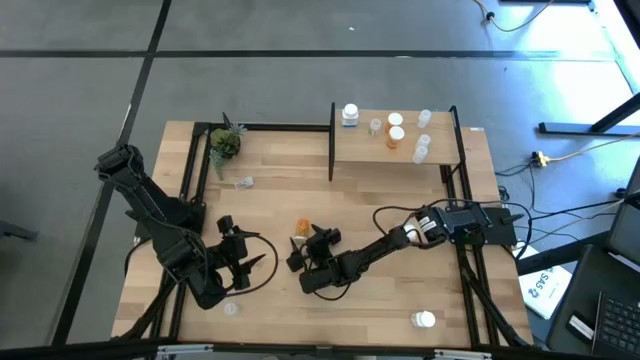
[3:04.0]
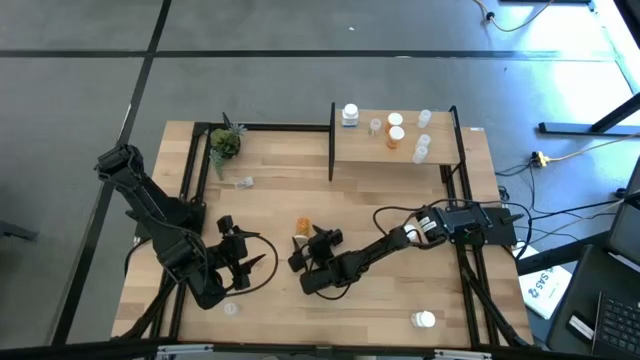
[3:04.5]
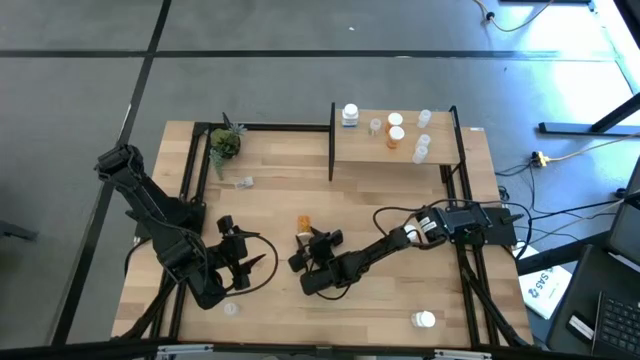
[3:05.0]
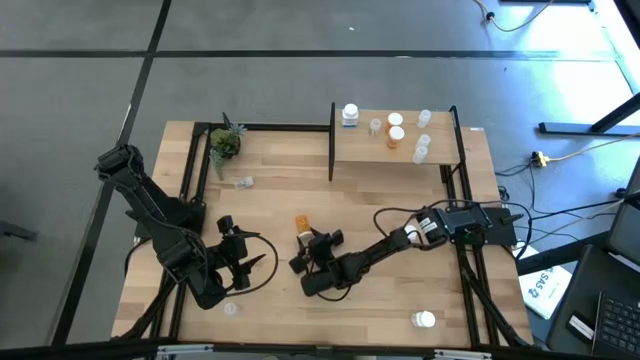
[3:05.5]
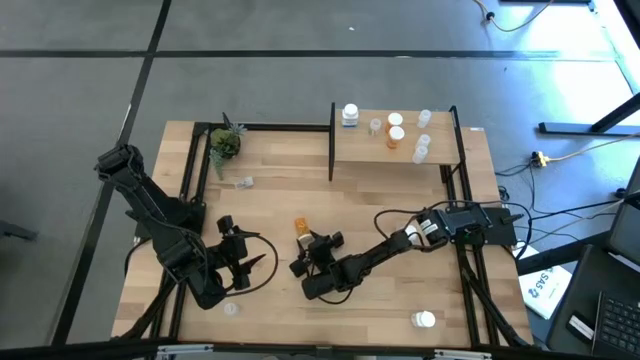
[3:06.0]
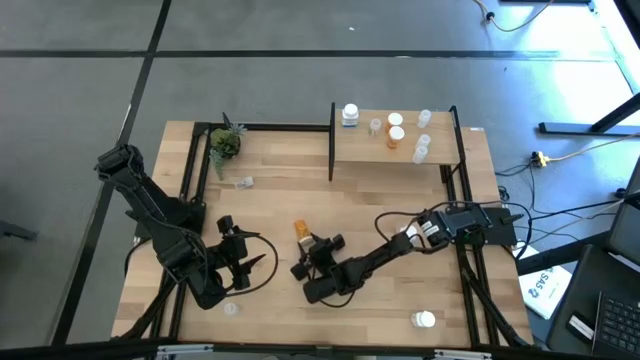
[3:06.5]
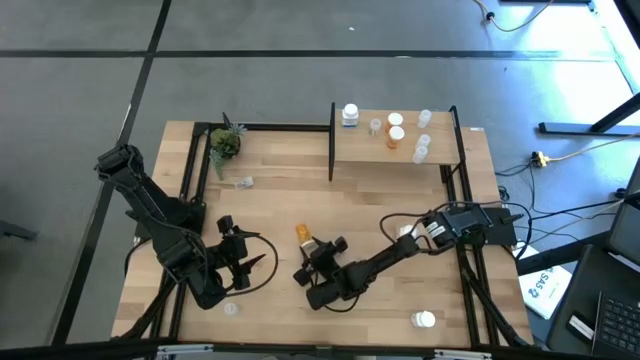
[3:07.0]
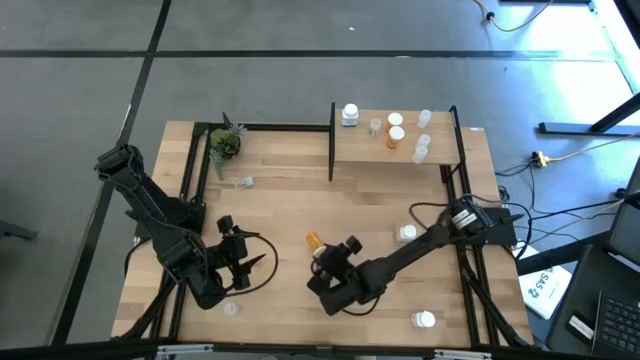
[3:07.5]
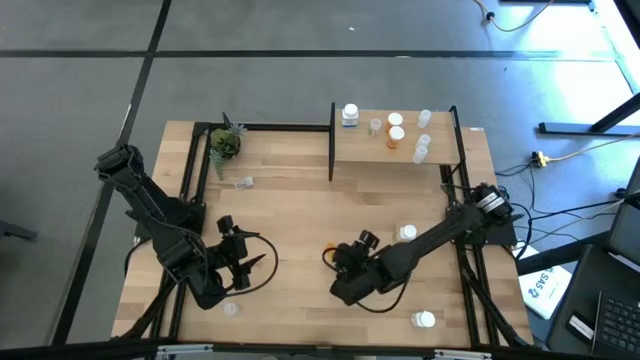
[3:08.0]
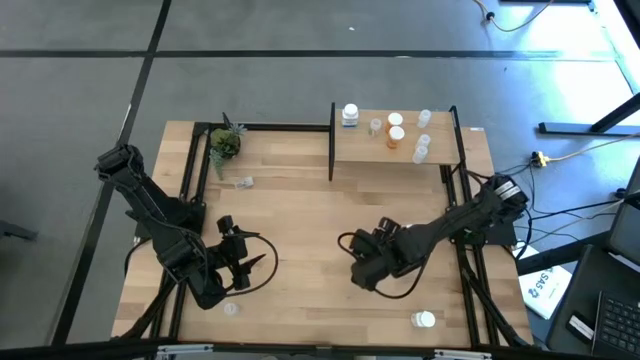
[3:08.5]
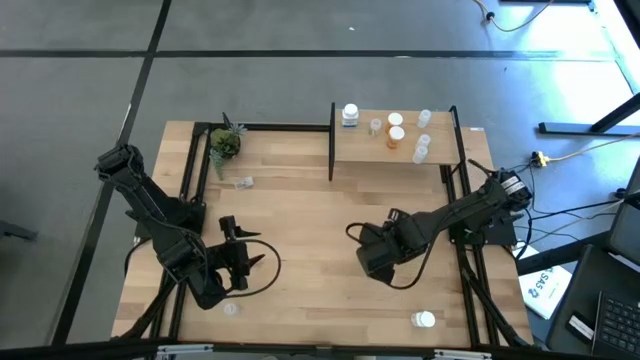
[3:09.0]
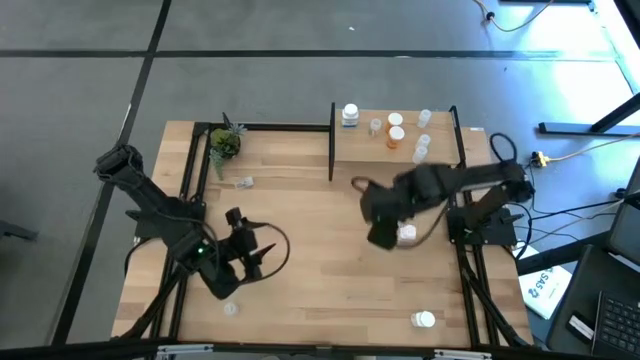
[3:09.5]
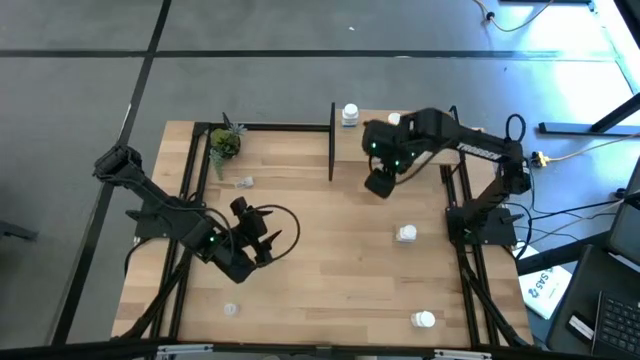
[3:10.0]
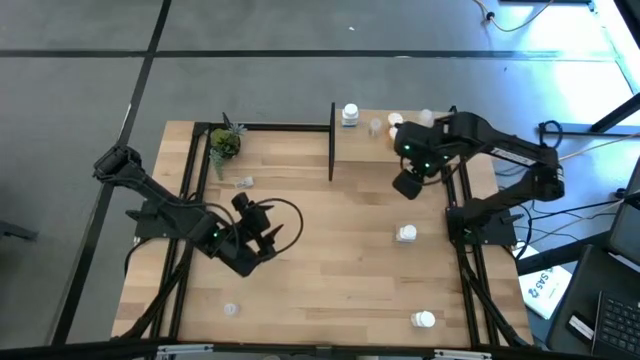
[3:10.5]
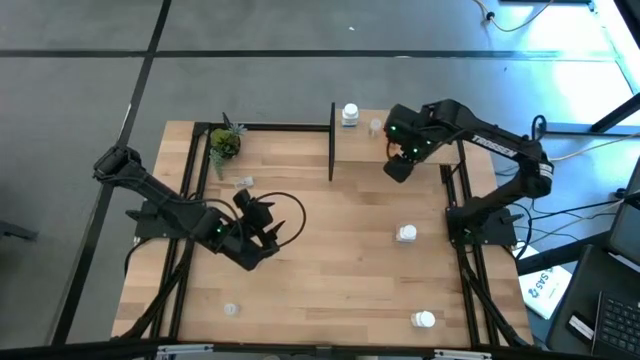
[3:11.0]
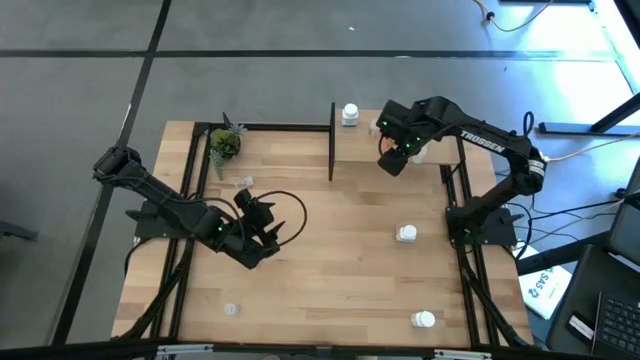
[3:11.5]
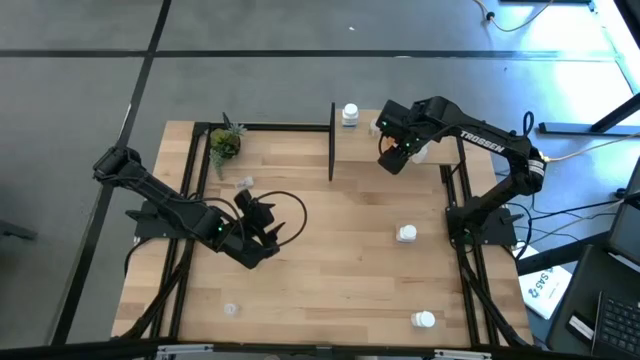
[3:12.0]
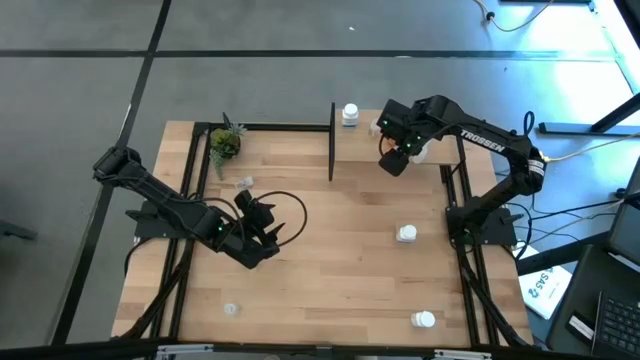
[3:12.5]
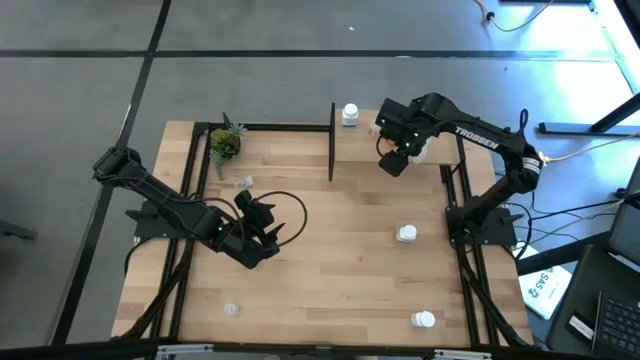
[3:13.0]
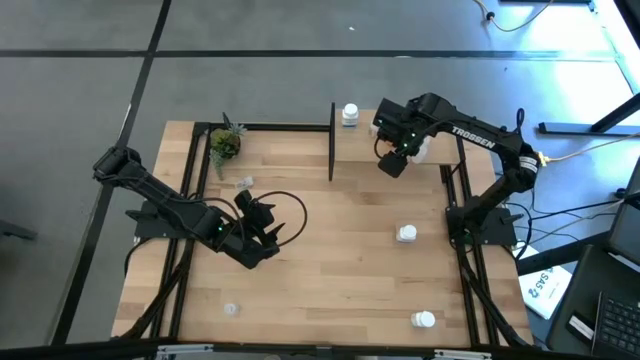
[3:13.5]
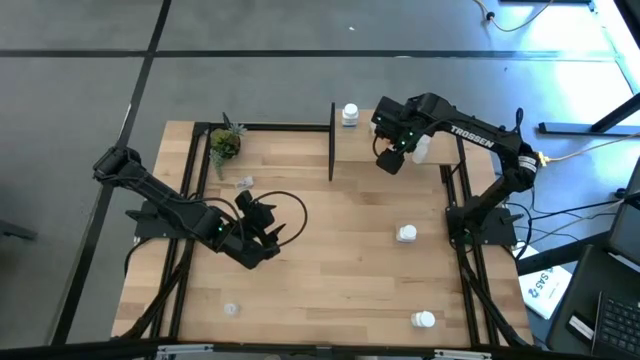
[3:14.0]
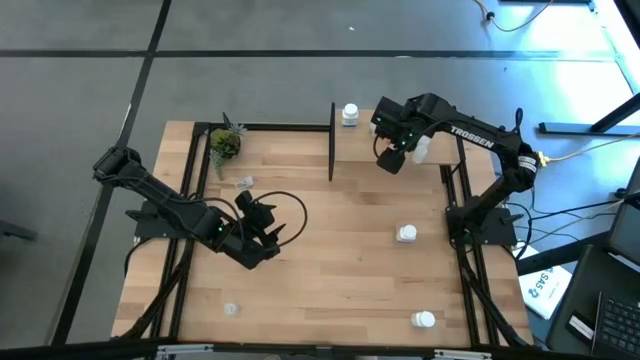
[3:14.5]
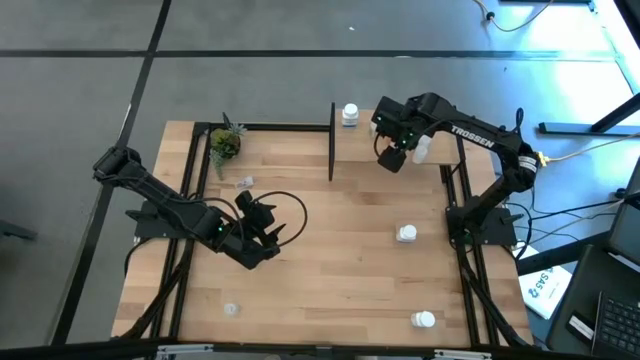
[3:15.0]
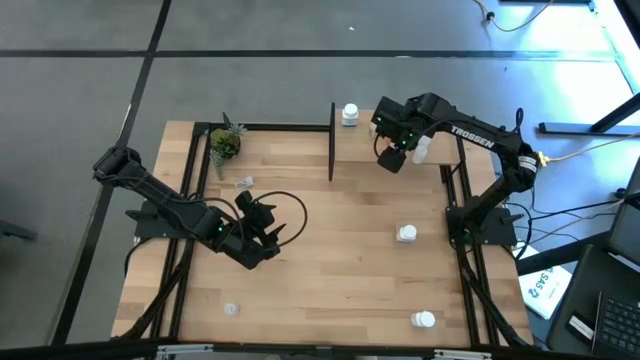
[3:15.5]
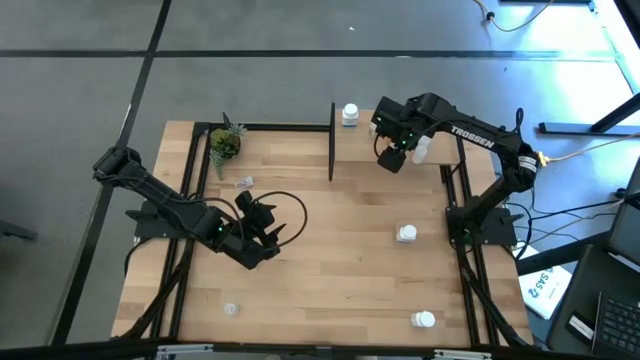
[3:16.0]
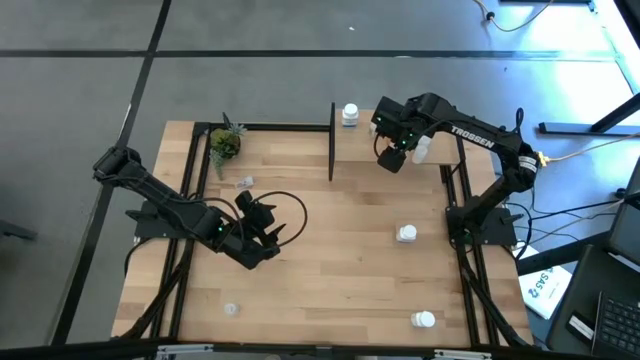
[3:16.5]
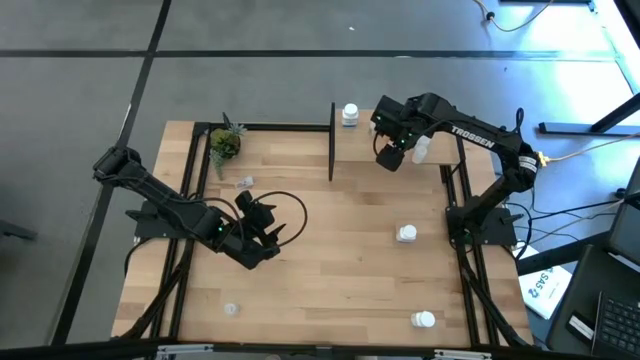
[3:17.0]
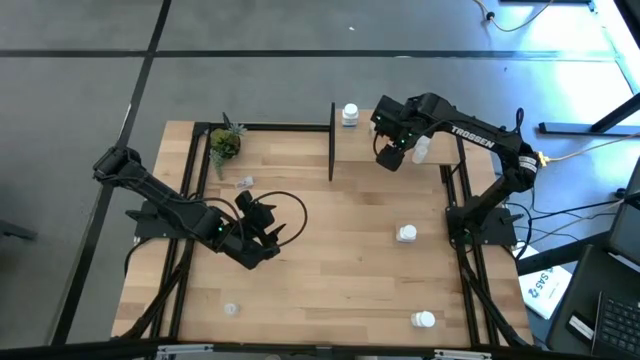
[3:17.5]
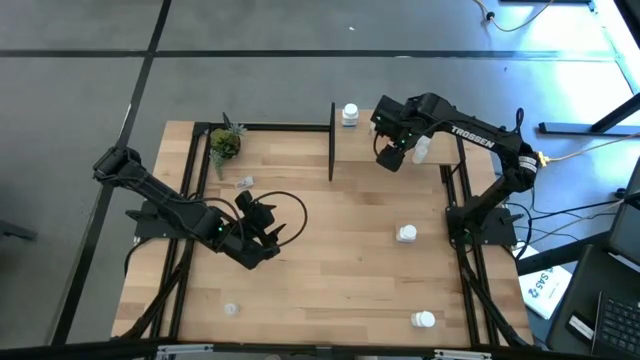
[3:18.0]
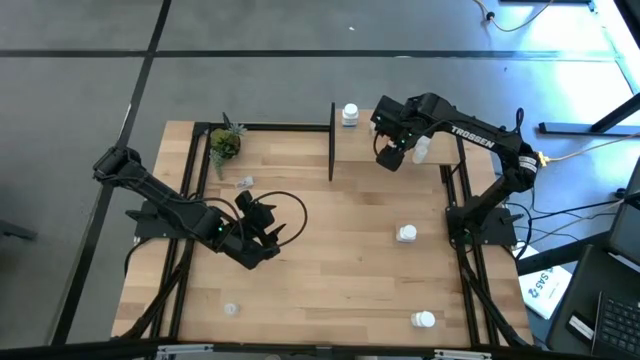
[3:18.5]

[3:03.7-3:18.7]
Task: Pick and place medicine bottles onto shelf by color
Put the orange pill bottle on the shelf aligned with the other orange pill bottle

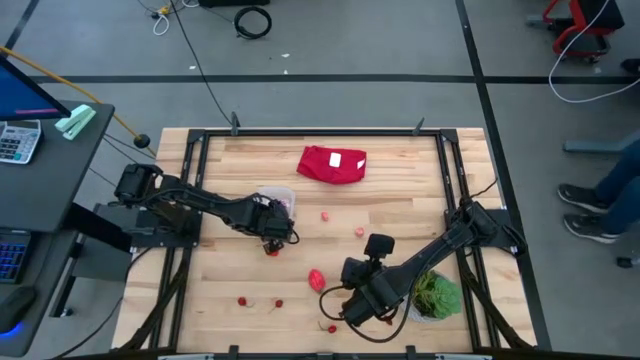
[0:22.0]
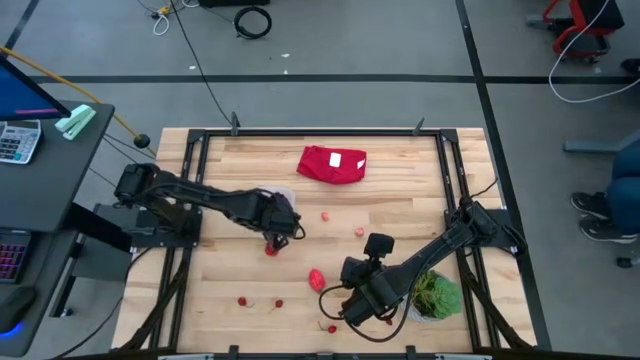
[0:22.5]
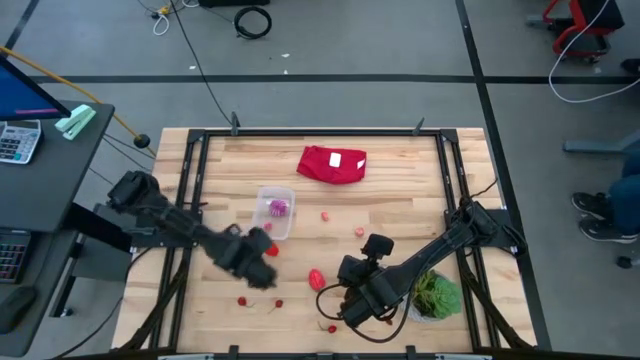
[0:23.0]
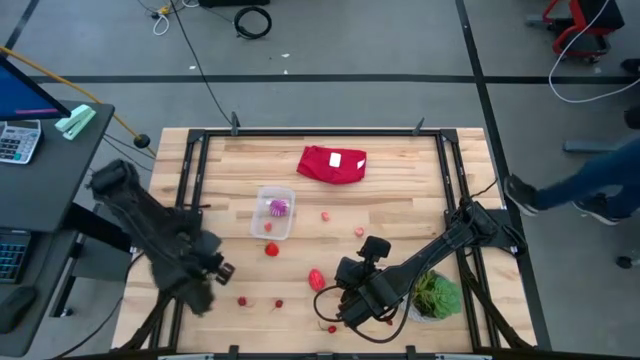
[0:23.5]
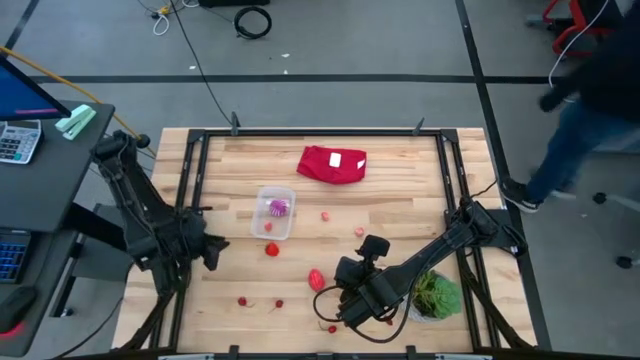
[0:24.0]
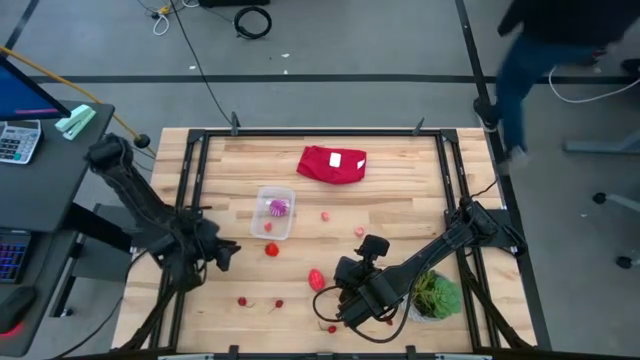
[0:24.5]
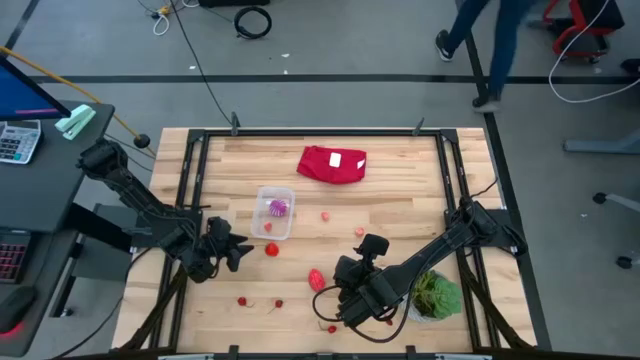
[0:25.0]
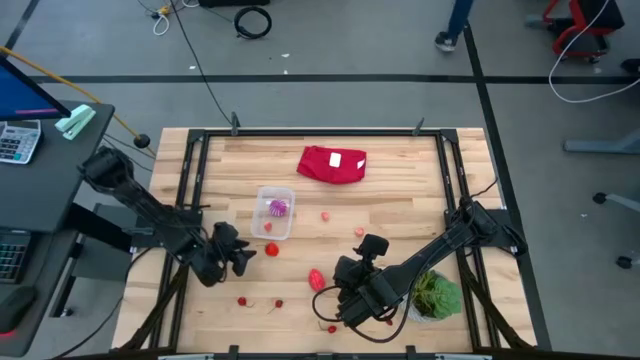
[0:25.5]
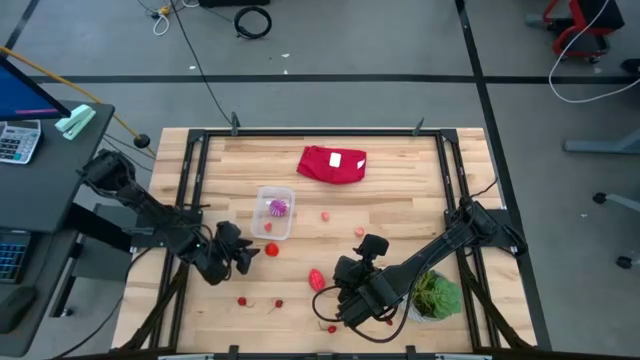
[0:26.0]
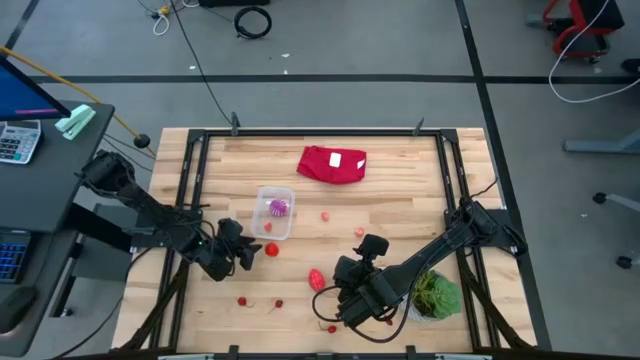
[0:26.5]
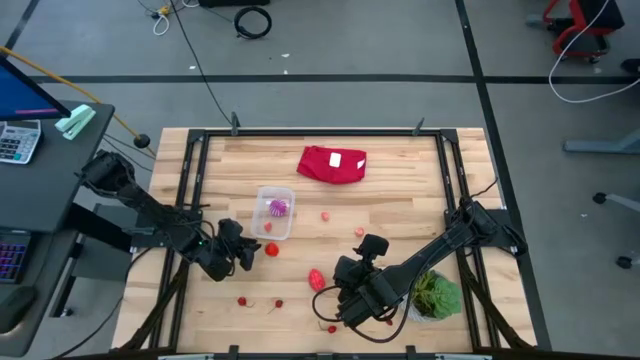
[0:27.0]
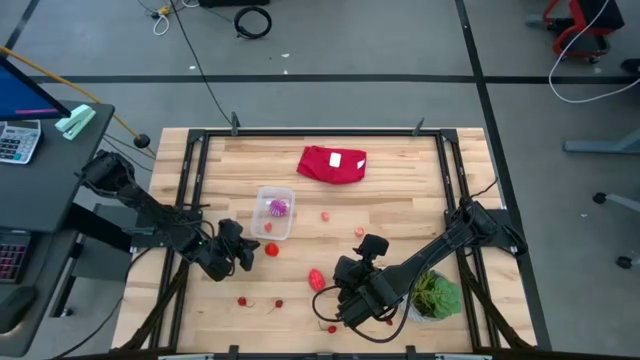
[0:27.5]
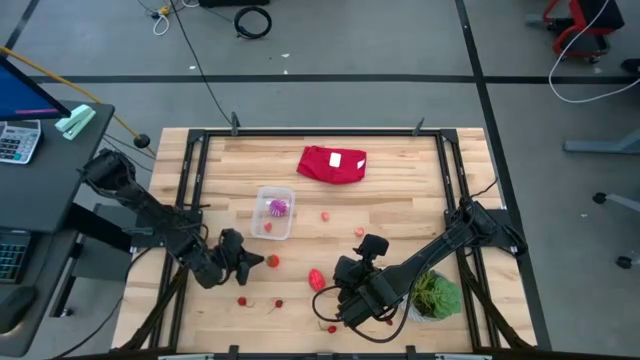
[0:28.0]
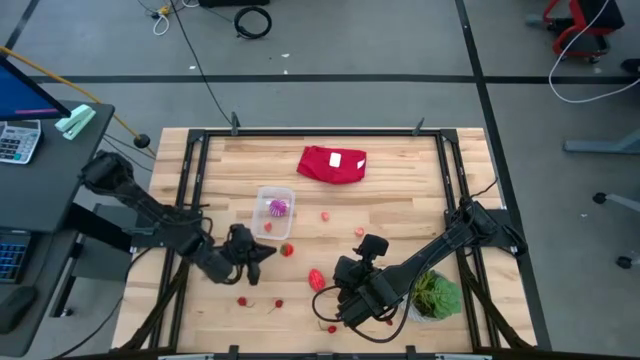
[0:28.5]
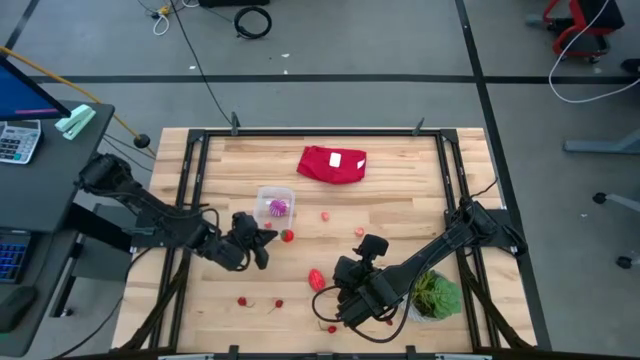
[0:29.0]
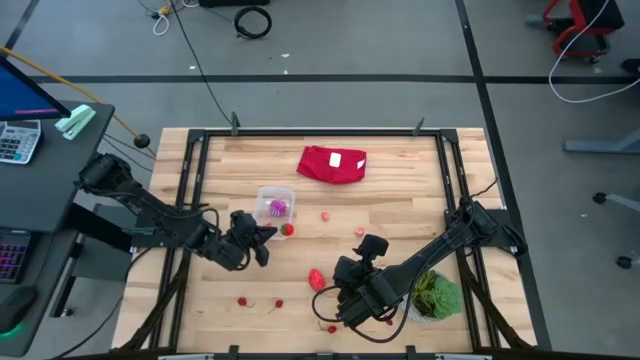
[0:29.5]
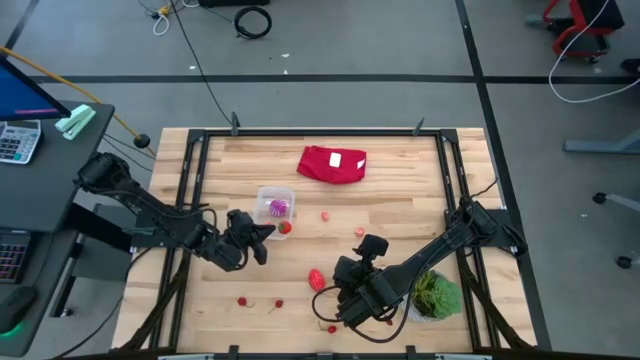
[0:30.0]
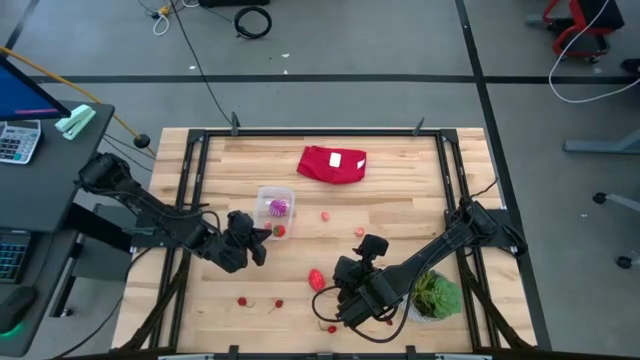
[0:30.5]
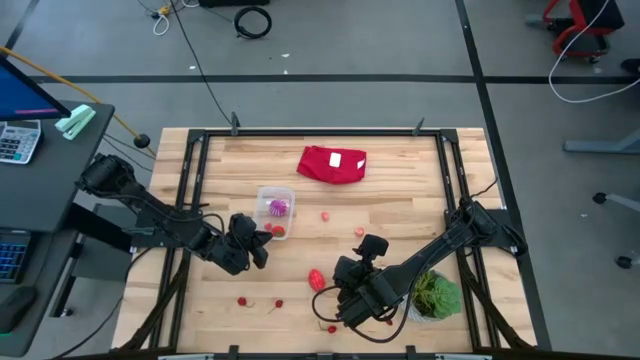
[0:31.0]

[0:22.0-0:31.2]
Task: Pick and placing Produce into tupperware
Put the red strawberry in the transparent bin
